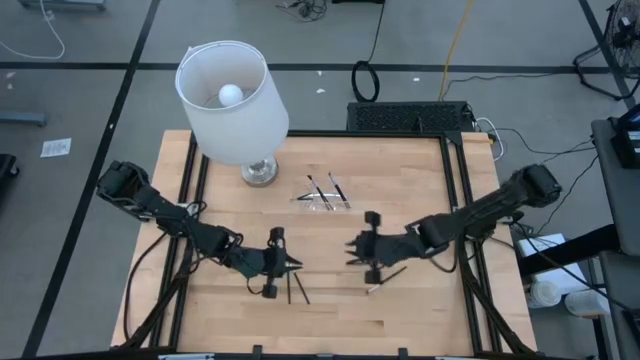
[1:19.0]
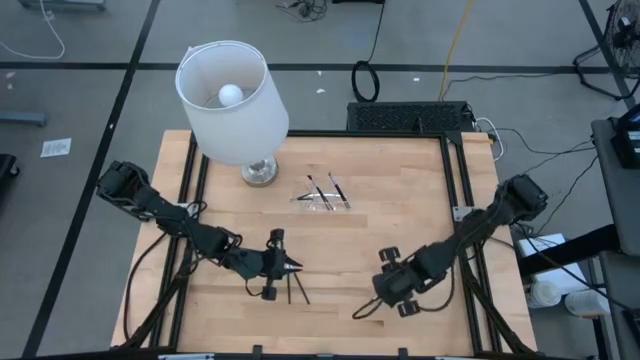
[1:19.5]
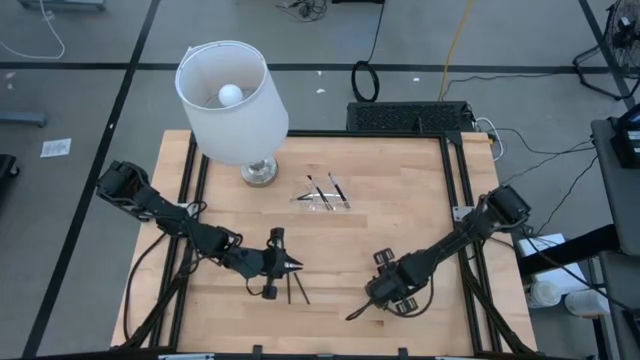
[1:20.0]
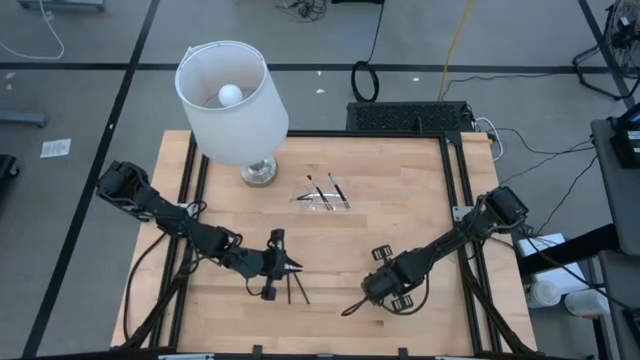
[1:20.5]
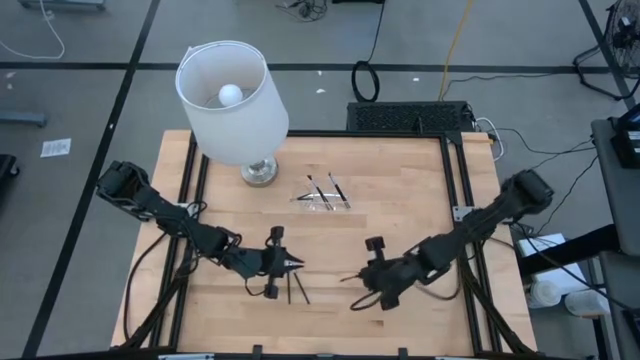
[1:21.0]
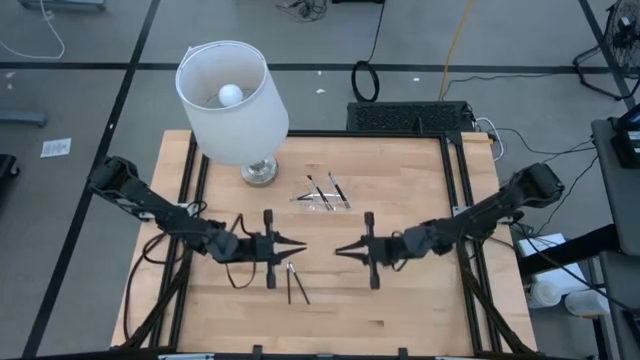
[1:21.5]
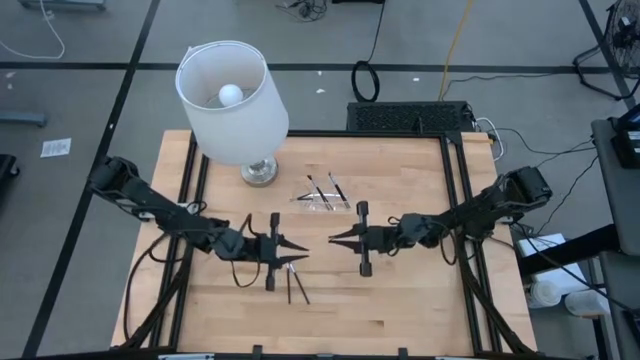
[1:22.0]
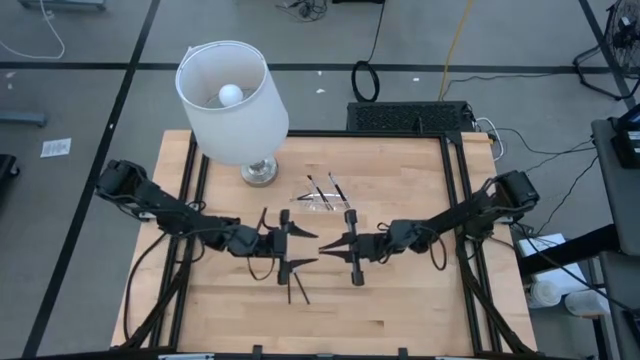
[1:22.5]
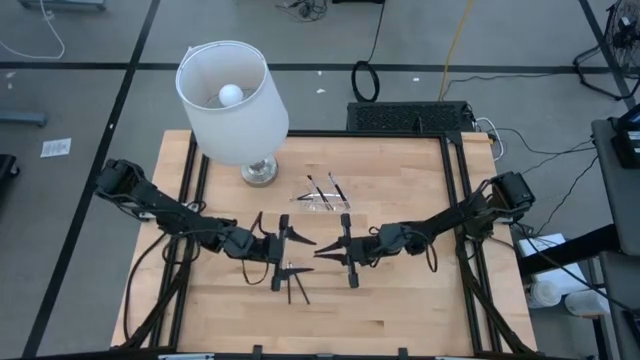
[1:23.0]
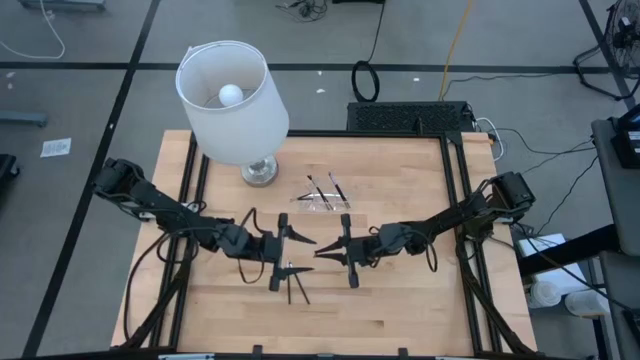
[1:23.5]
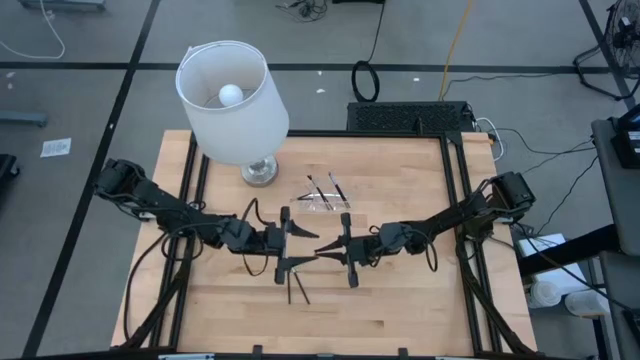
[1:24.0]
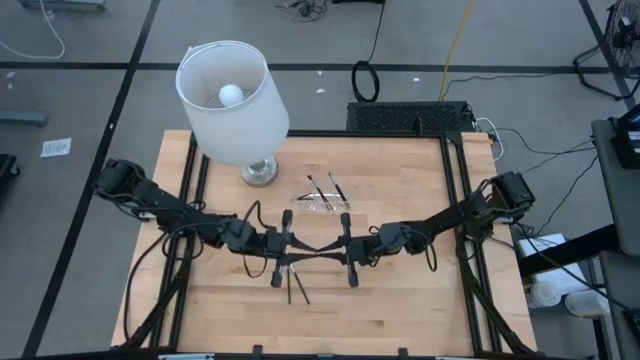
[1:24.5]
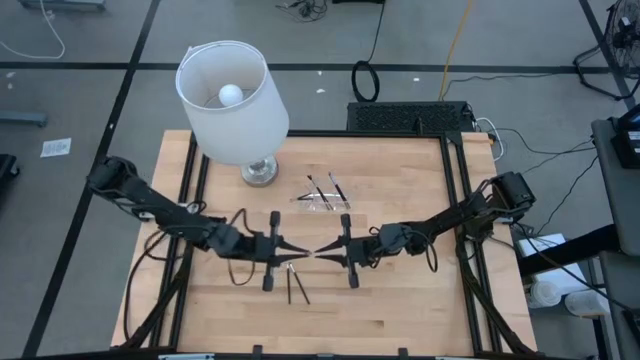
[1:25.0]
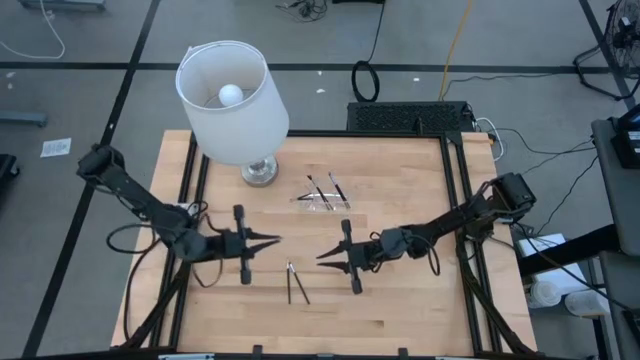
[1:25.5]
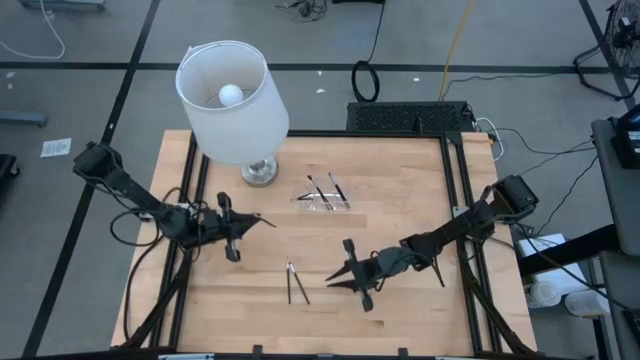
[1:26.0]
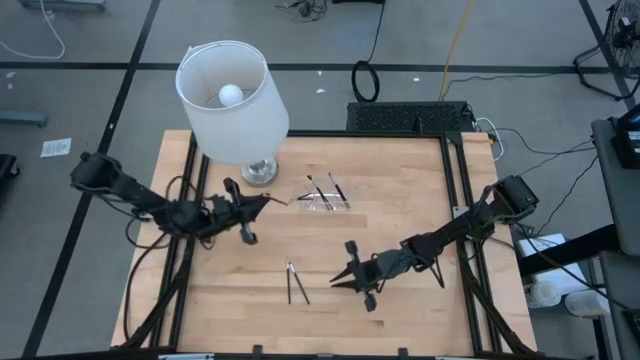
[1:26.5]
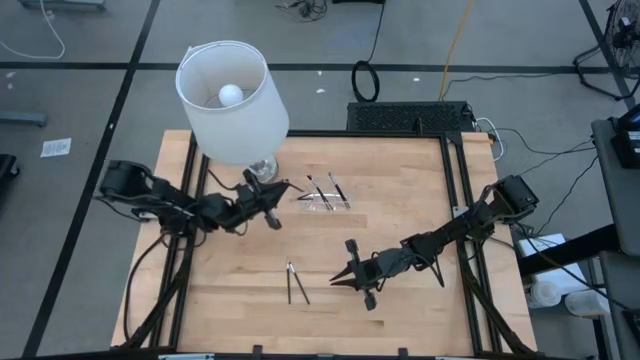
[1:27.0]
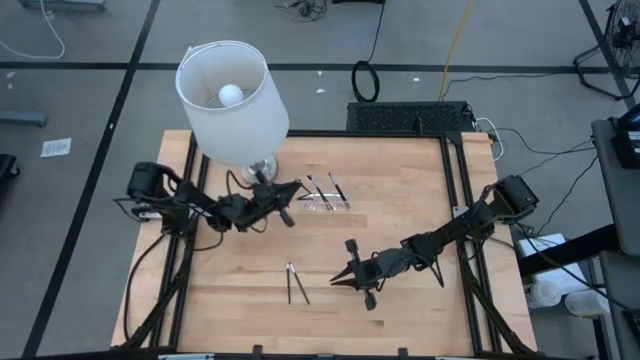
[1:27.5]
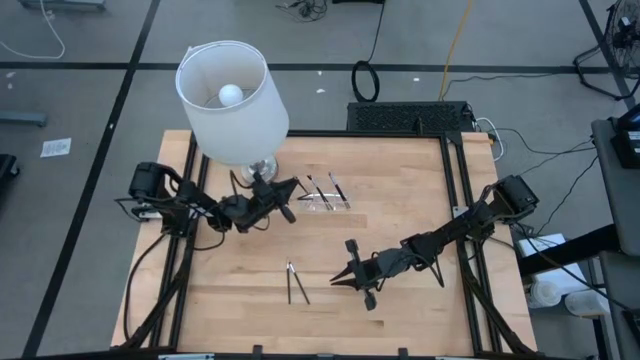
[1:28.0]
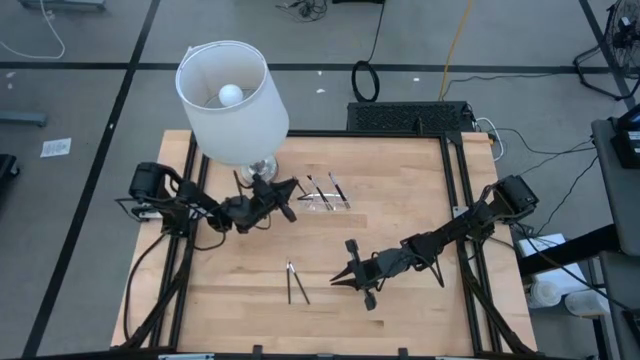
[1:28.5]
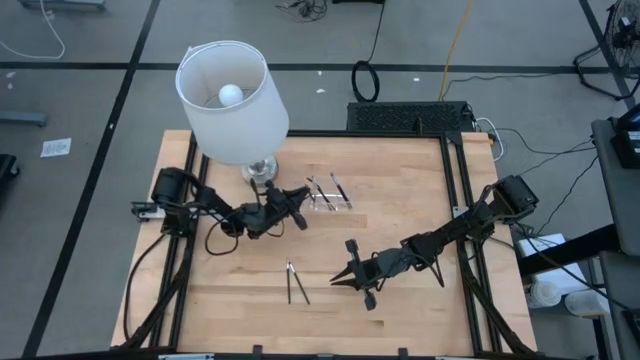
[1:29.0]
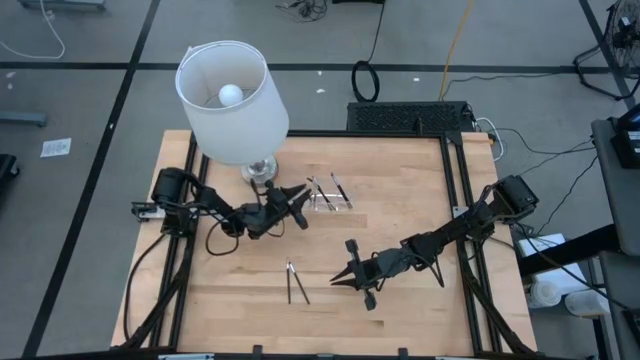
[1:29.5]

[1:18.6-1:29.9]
Task: Put items in baskets/containers
Put the black blush brush into the transparent organizer

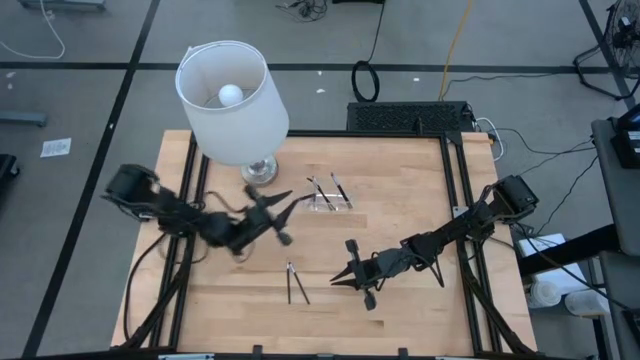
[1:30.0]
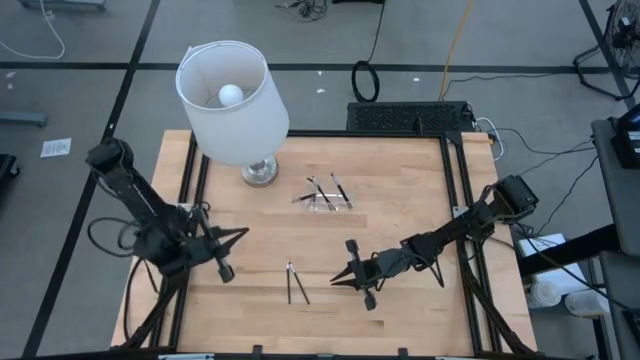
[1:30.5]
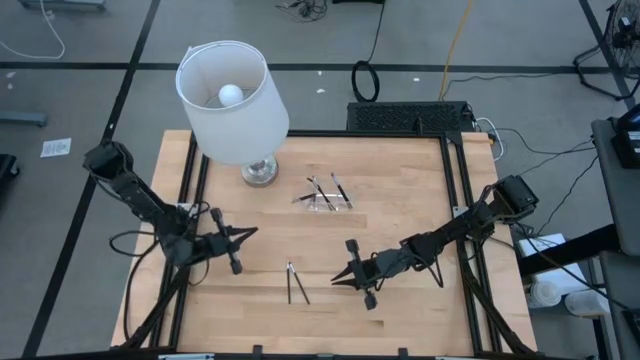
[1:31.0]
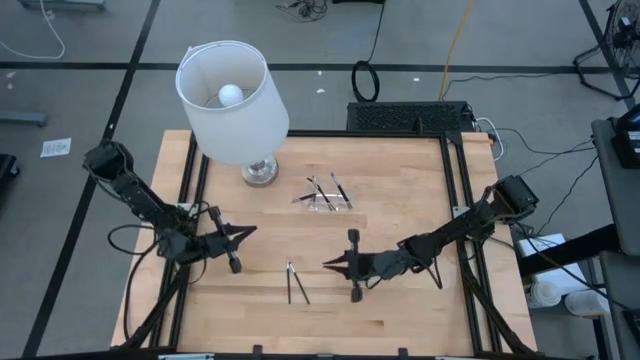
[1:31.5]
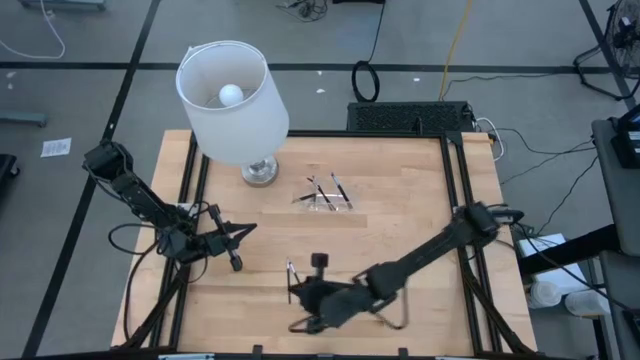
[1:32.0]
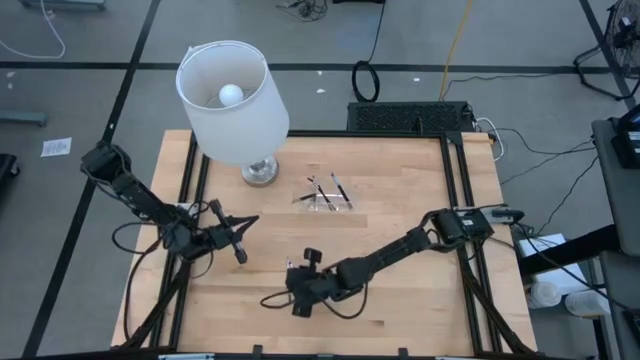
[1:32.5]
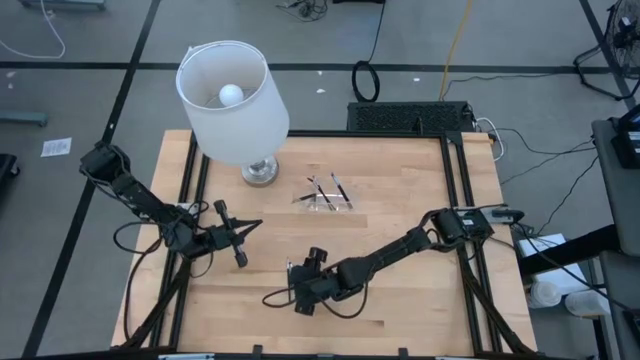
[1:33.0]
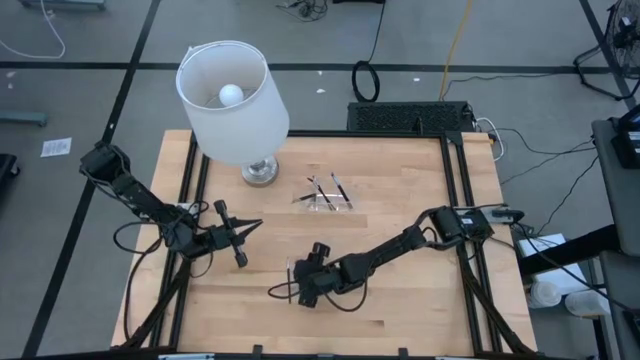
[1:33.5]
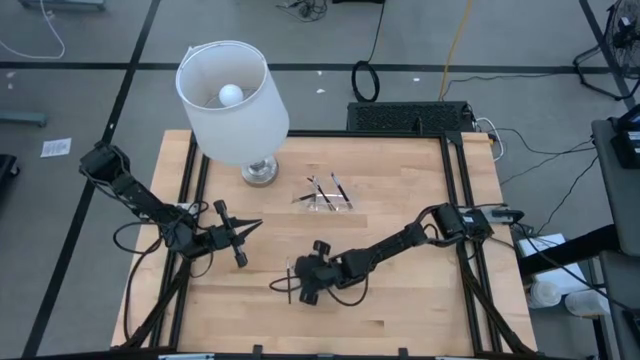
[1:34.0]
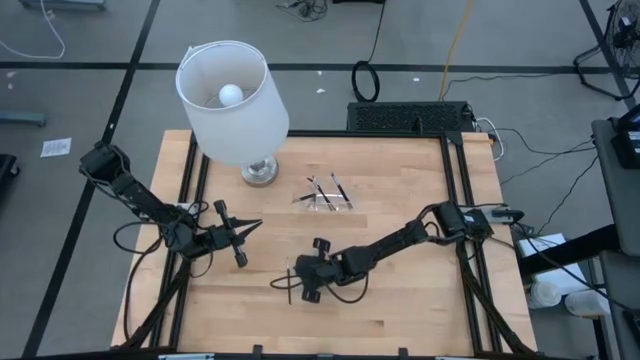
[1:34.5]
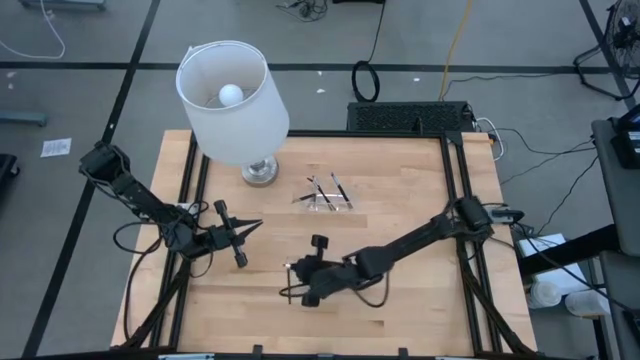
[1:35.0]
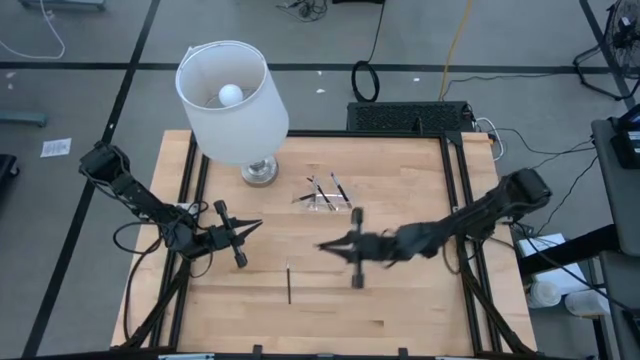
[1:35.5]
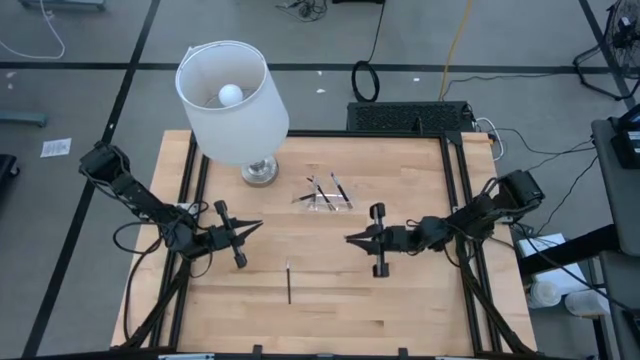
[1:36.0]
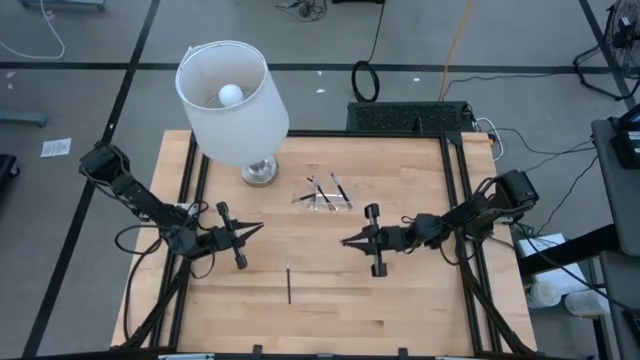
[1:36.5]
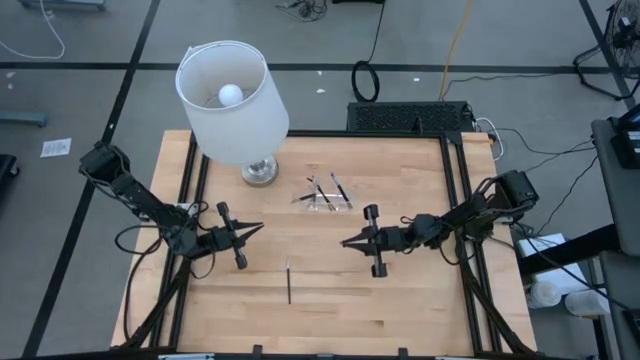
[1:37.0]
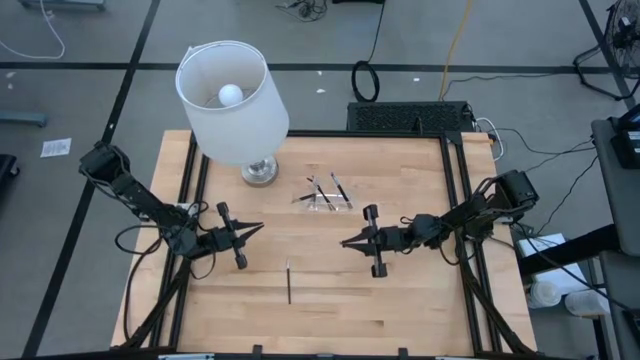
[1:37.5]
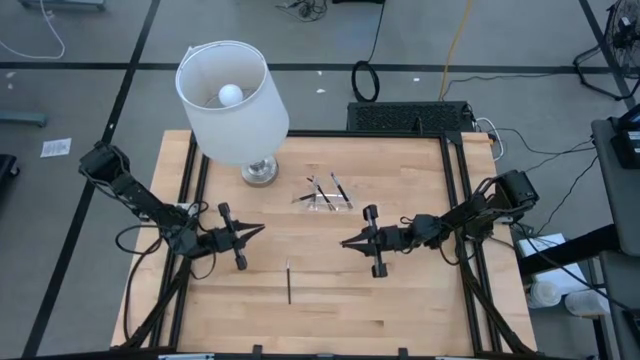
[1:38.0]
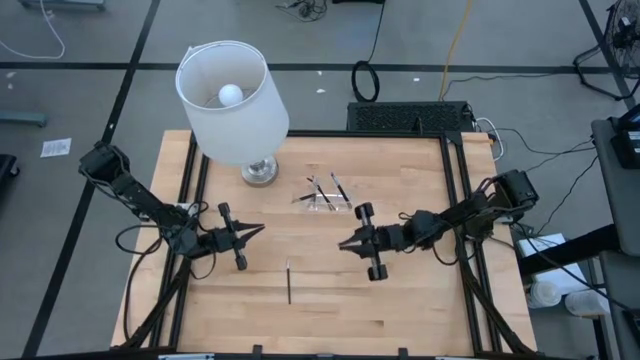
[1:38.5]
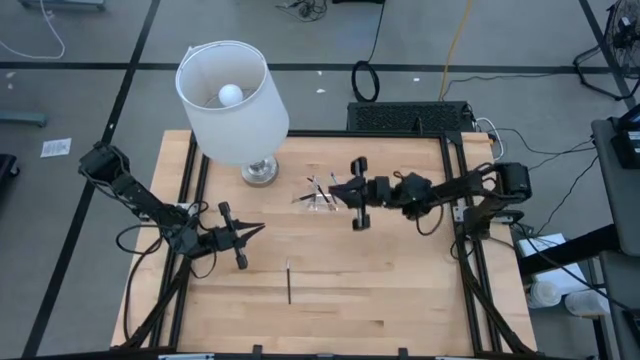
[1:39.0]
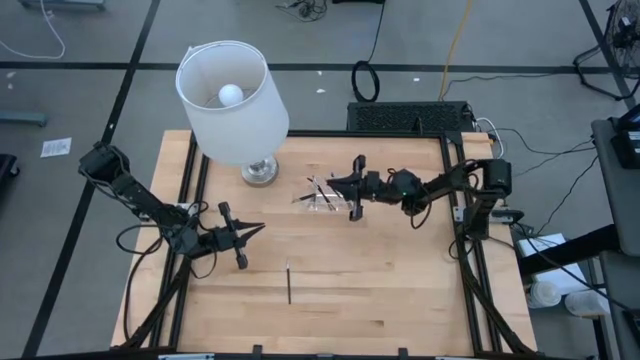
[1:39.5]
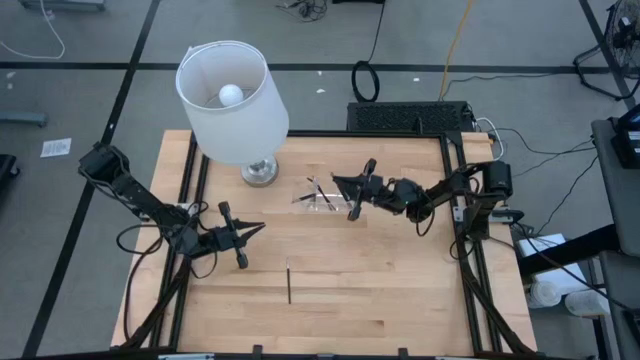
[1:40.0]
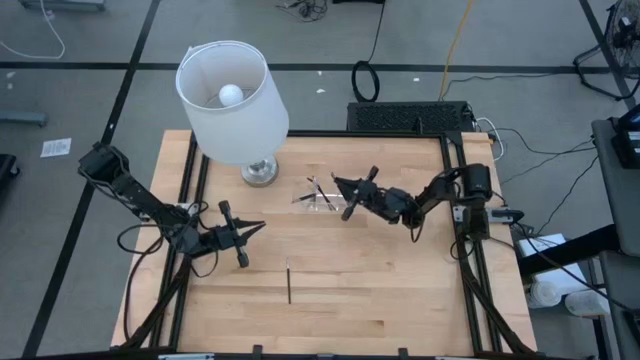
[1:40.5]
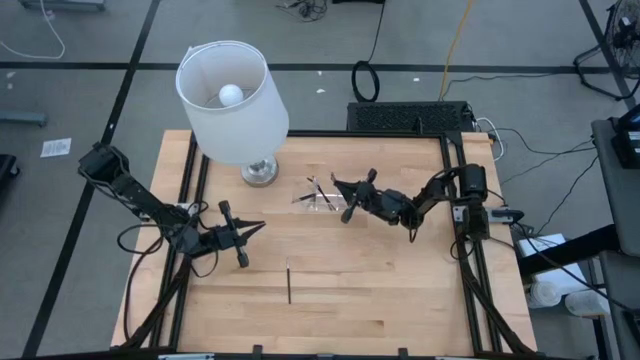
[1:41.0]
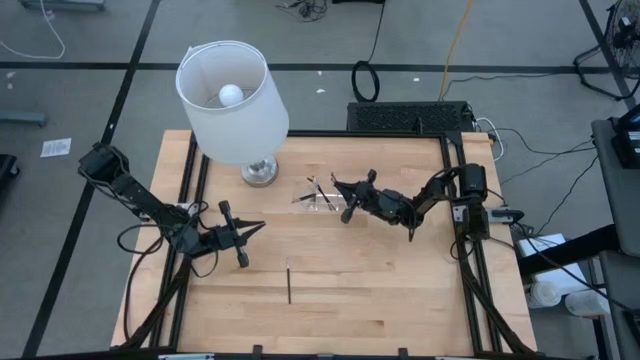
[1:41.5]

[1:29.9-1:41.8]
Put the black eyeshadow brush into the transparent organizer
